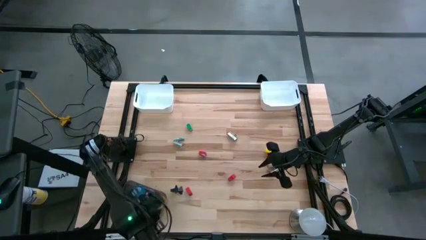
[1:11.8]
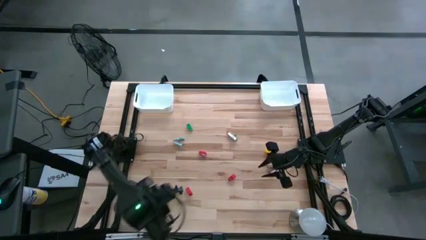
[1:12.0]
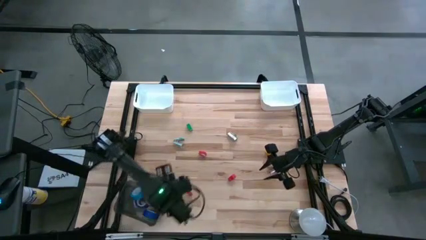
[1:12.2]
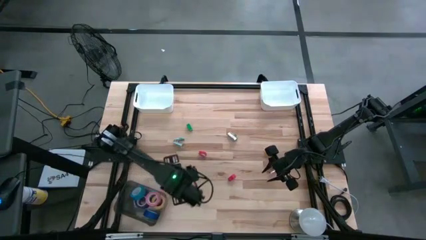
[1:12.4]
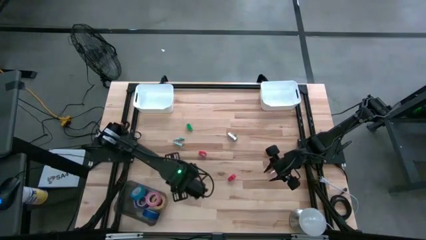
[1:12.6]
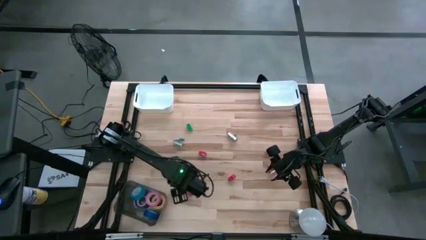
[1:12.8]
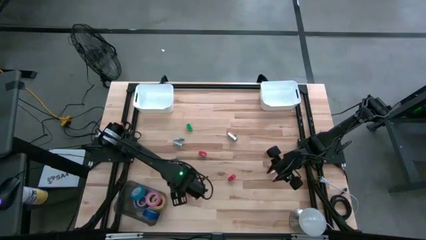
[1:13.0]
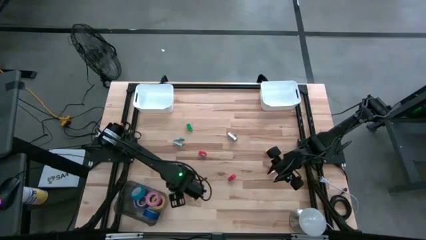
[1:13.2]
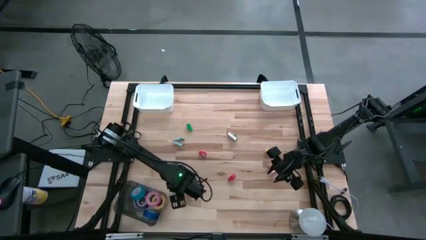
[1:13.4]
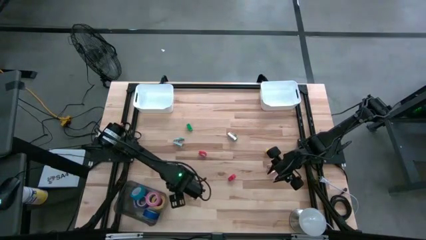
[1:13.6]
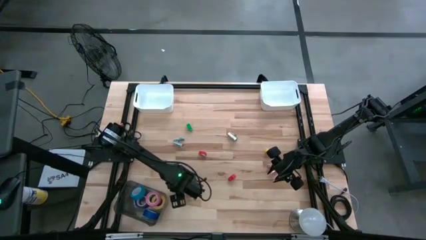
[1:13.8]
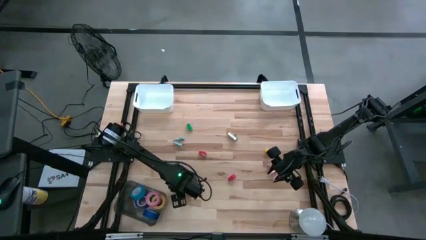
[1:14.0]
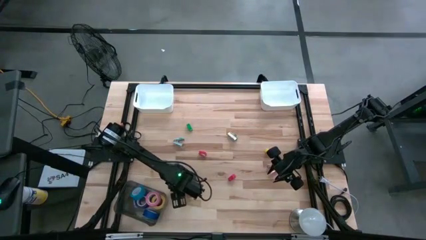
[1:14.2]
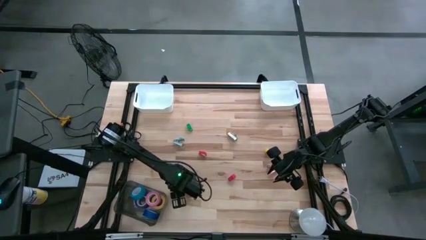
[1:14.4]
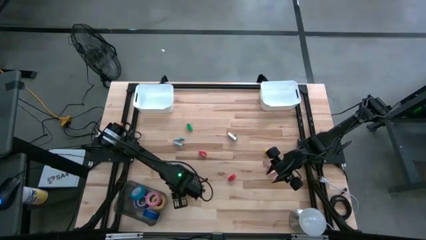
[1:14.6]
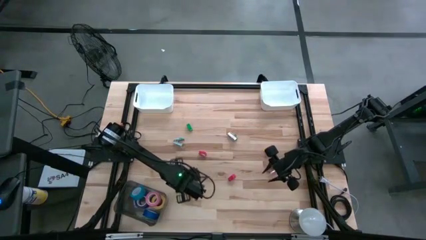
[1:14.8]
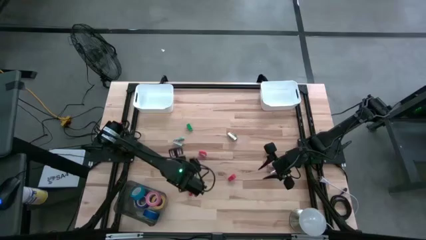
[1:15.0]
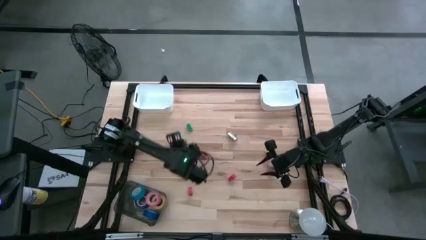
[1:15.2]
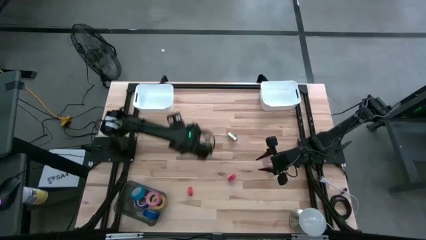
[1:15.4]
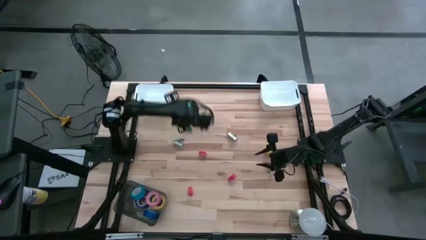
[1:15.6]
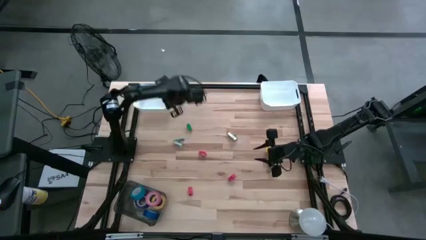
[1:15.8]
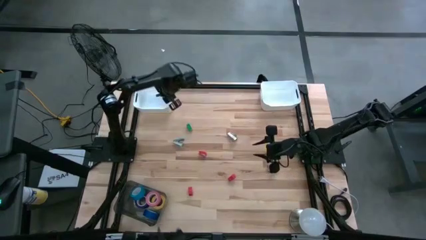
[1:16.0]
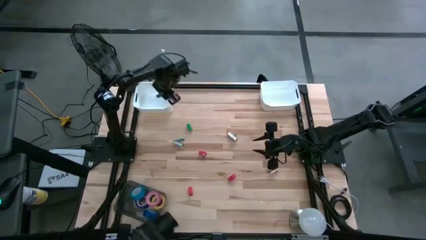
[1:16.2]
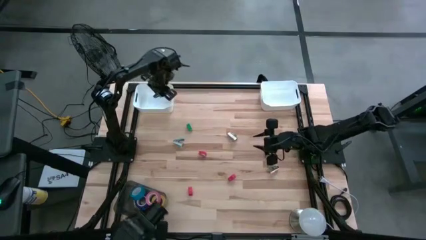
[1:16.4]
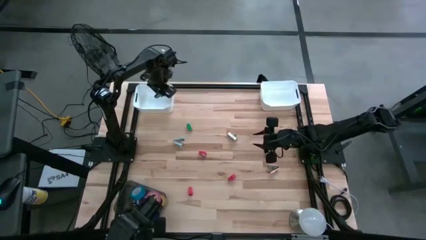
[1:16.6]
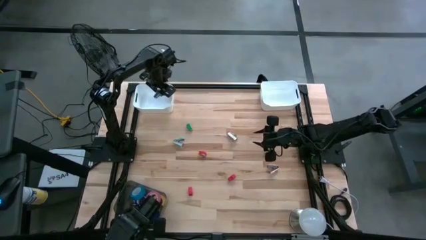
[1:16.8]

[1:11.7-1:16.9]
Task: Pick and place Stapler, Stapler remover, tape
Put the black staple remover into the left white bin

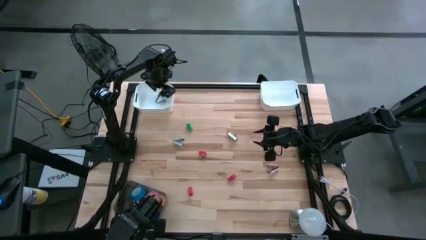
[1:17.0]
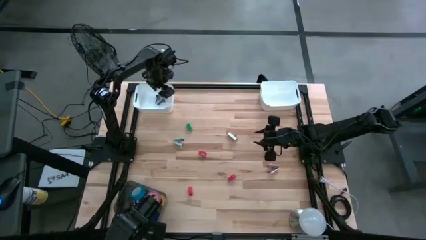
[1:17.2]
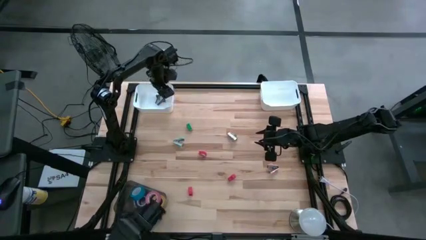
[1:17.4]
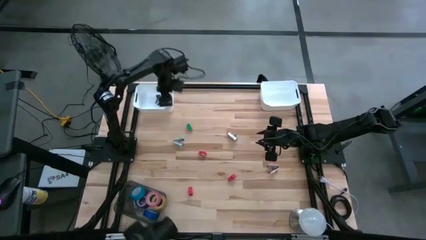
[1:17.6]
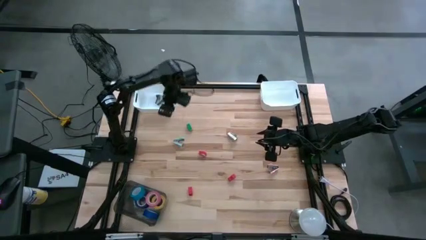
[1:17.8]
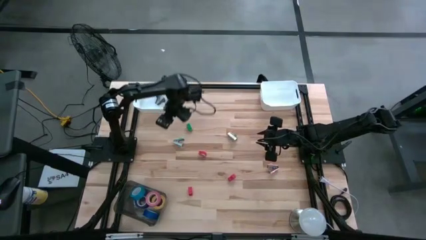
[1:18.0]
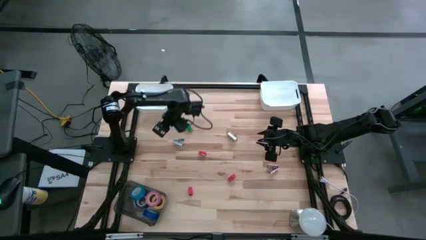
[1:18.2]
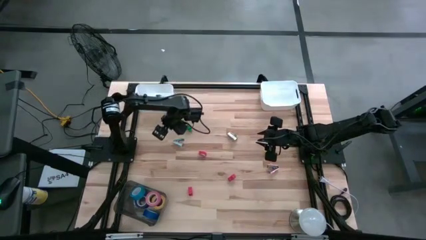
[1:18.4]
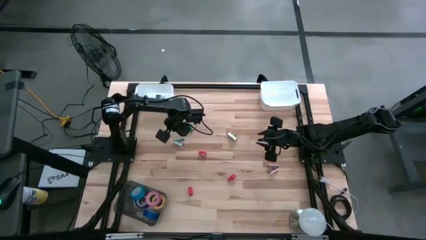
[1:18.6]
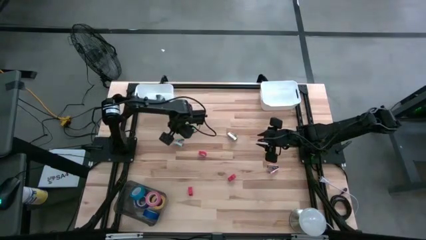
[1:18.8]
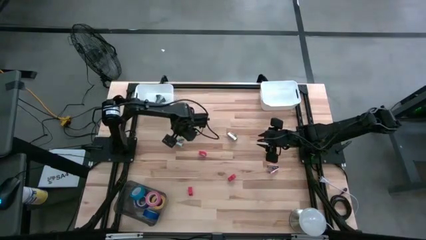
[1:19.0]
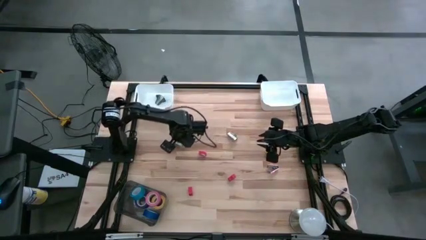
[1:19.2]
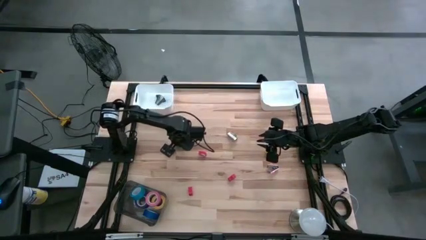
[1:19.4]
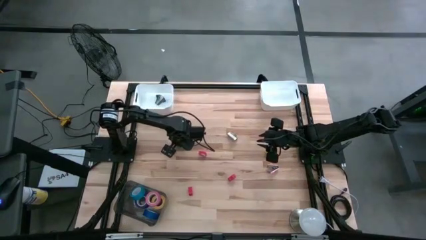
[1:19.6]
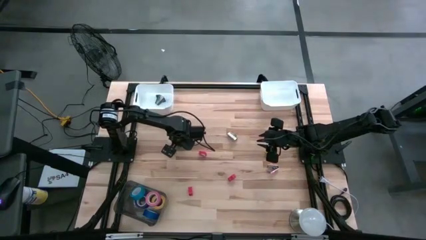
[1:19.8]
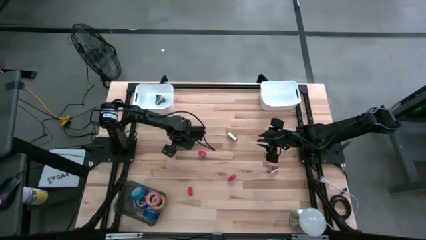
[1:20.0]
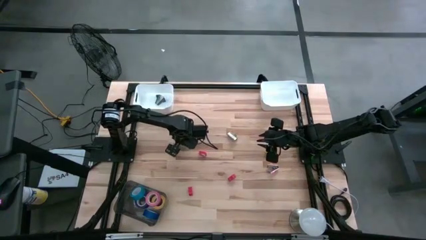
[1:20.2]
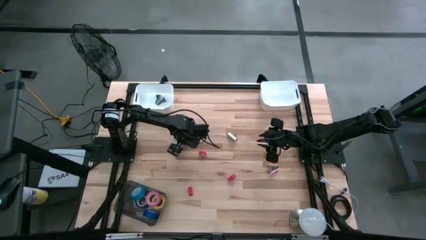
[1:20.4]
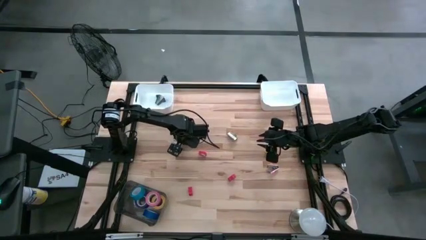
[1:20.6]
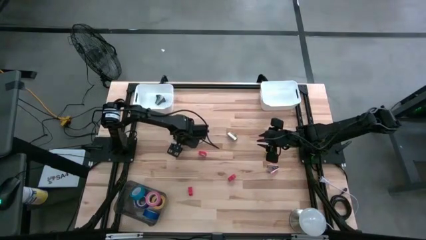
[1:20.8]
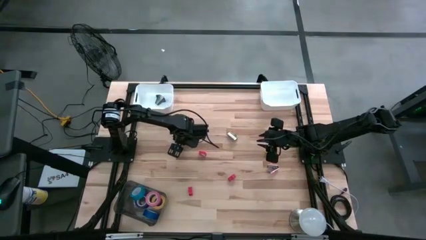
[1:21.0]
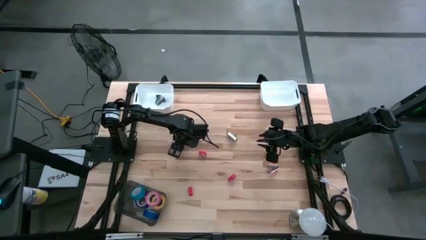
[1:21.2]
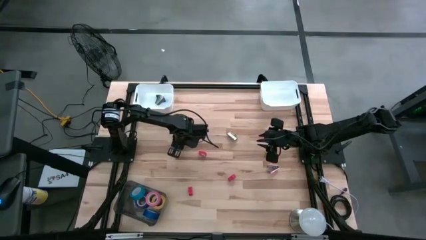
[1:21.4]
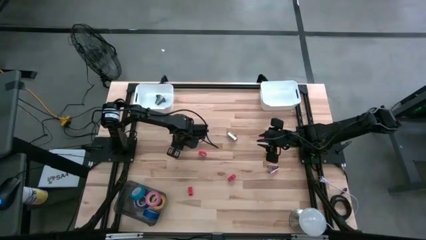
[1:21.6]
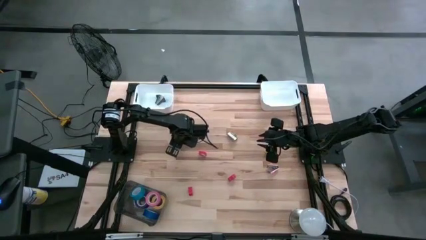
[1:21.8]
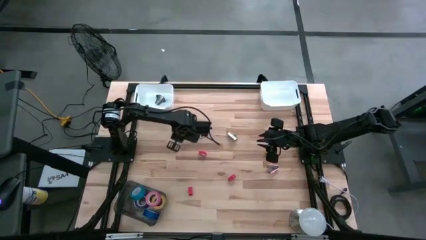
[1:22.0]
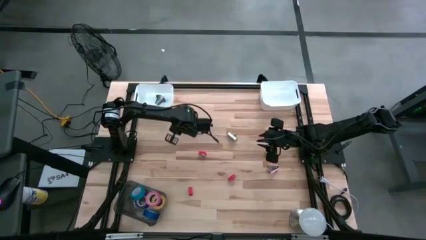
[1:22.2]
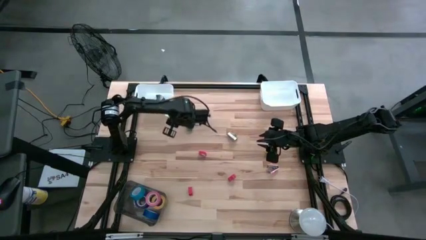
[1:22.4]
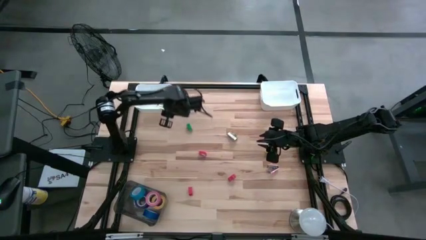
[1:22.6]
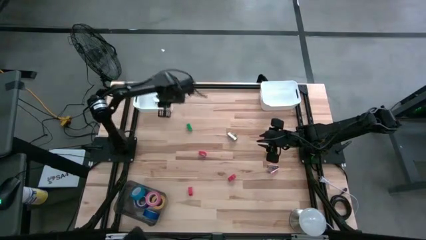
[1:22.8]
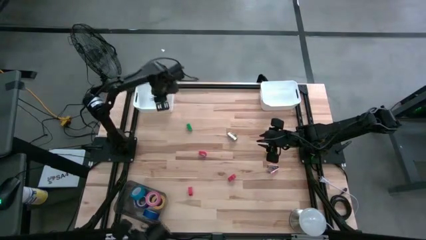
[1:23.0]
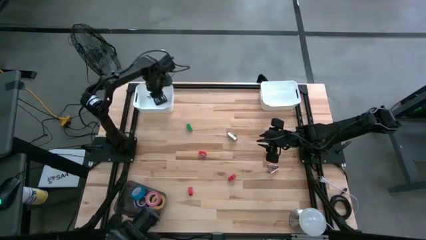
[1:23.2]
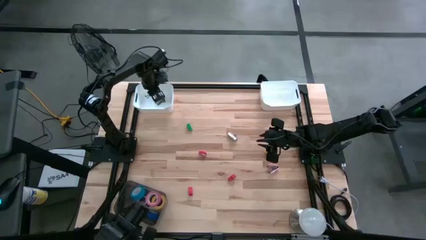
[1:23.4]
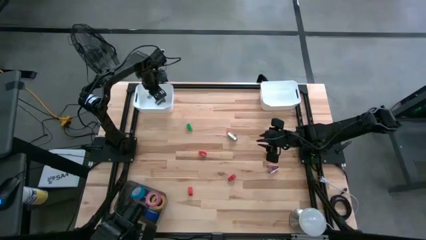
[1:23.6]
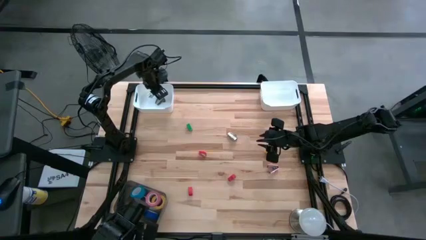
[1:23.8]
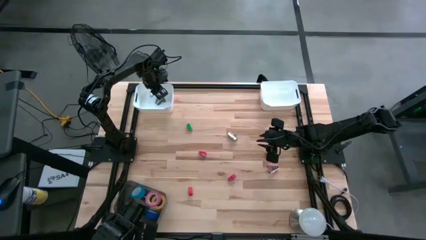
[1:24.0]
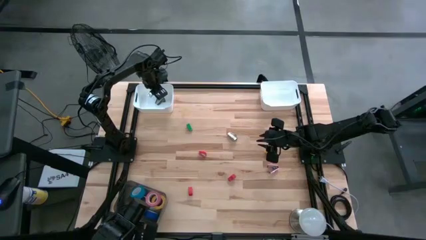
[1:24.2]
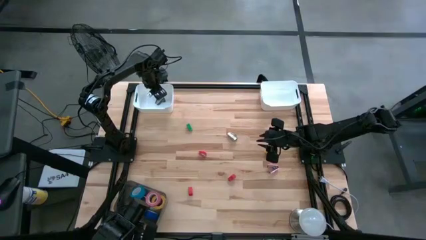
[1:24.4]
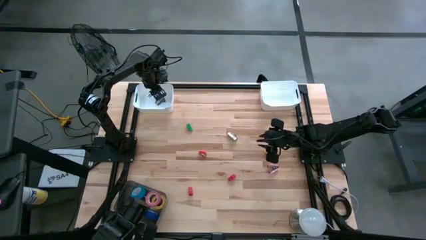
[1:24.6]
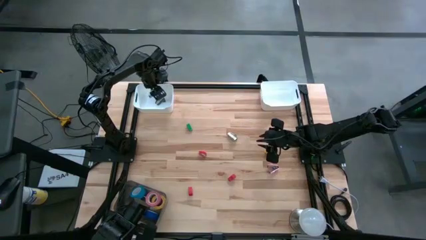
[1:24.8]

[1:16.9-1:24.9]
Put the light blue staple remover into the left white bin
